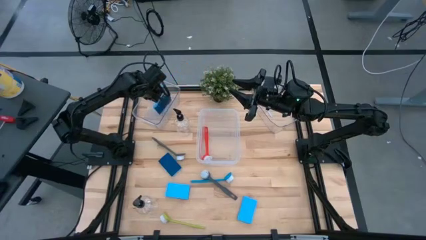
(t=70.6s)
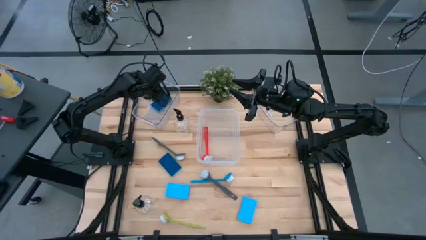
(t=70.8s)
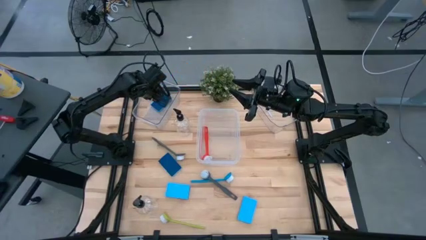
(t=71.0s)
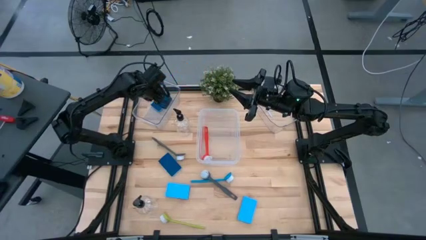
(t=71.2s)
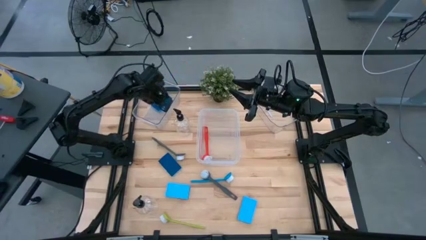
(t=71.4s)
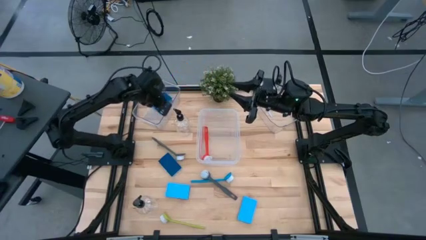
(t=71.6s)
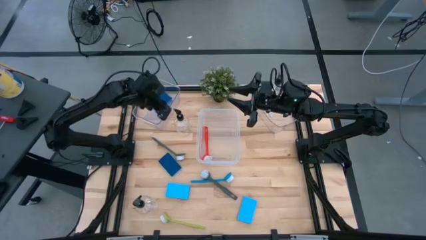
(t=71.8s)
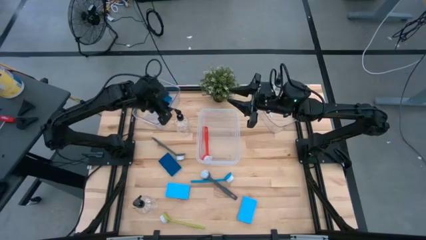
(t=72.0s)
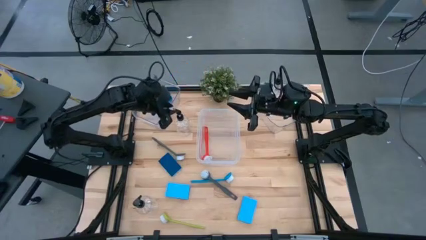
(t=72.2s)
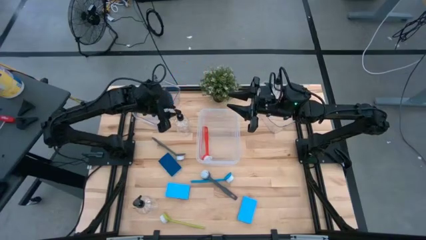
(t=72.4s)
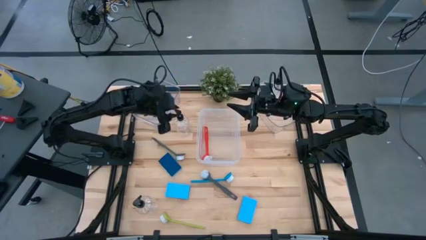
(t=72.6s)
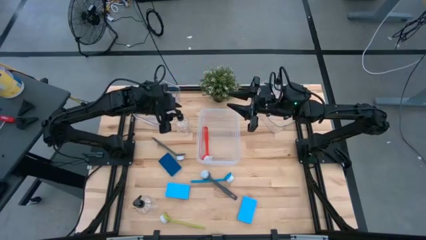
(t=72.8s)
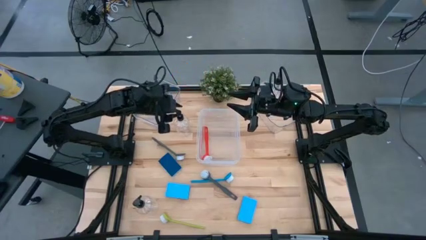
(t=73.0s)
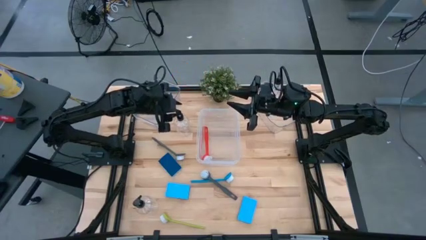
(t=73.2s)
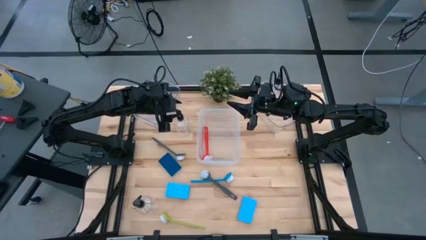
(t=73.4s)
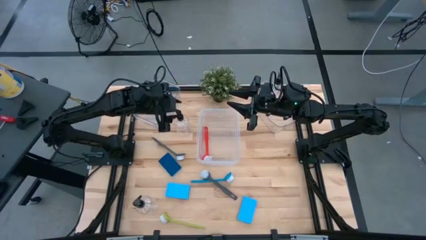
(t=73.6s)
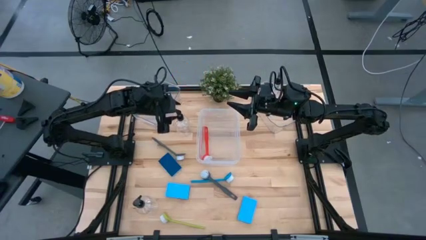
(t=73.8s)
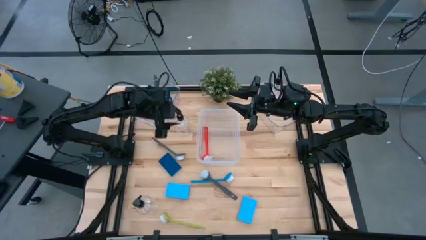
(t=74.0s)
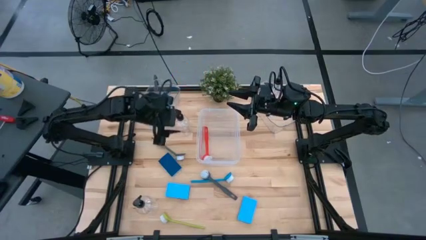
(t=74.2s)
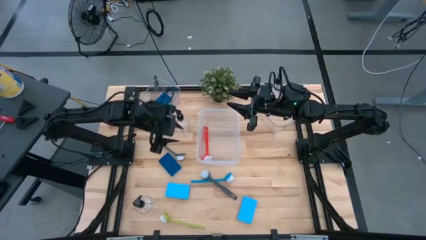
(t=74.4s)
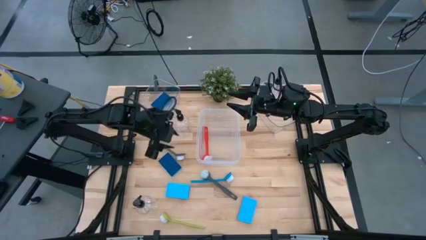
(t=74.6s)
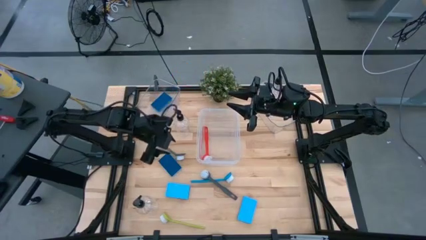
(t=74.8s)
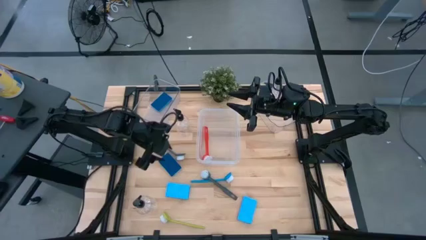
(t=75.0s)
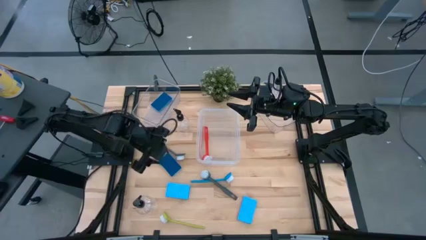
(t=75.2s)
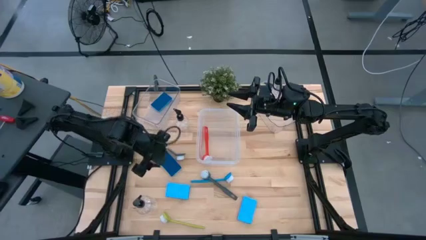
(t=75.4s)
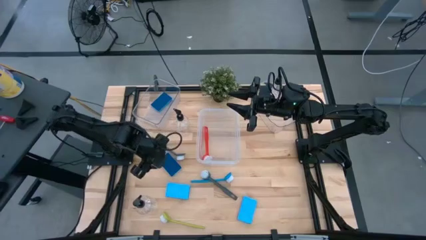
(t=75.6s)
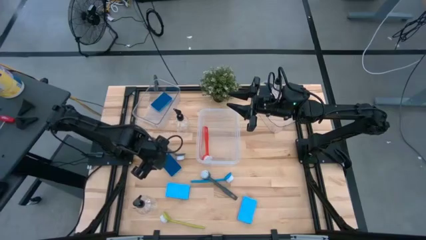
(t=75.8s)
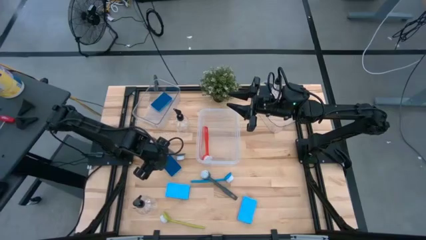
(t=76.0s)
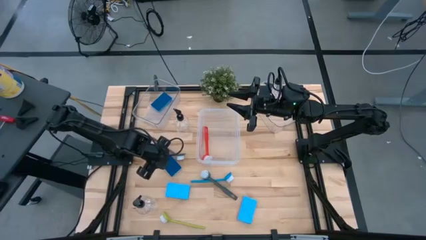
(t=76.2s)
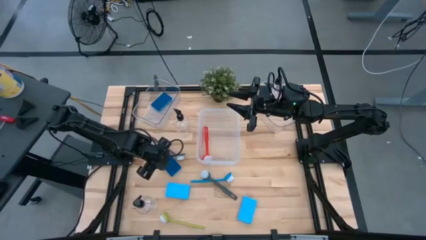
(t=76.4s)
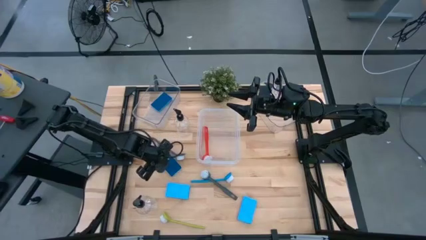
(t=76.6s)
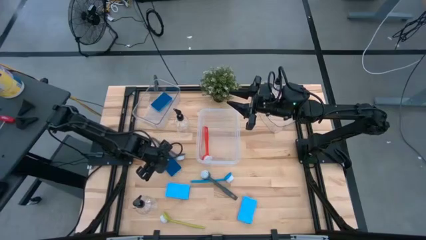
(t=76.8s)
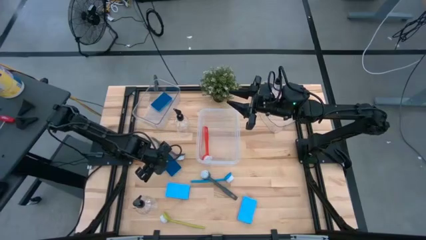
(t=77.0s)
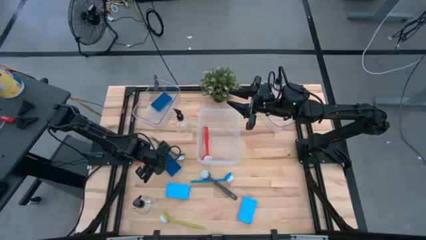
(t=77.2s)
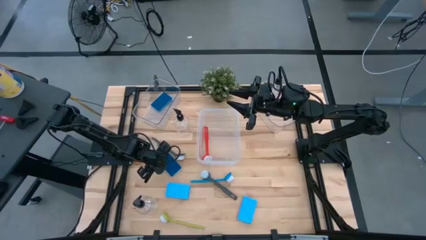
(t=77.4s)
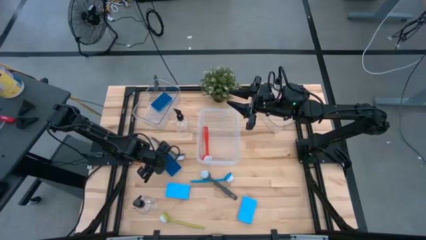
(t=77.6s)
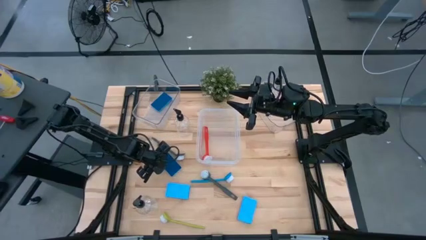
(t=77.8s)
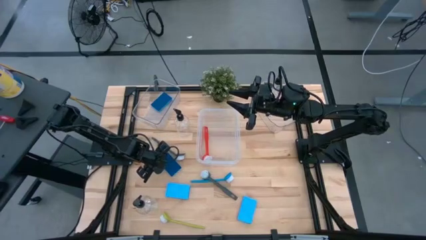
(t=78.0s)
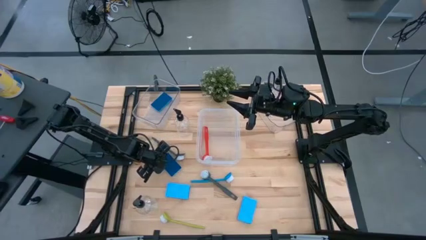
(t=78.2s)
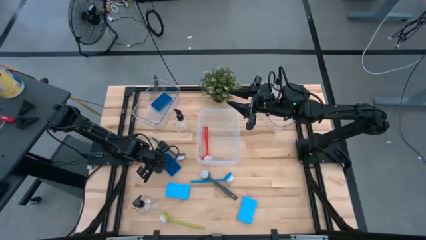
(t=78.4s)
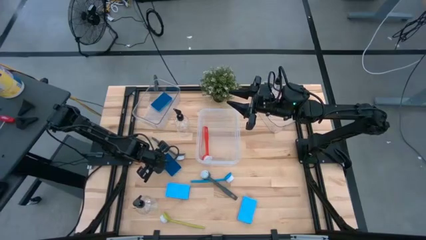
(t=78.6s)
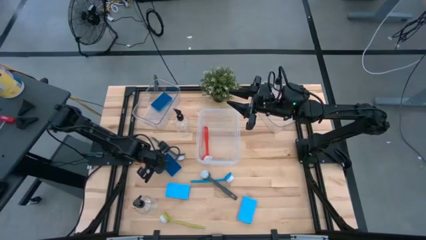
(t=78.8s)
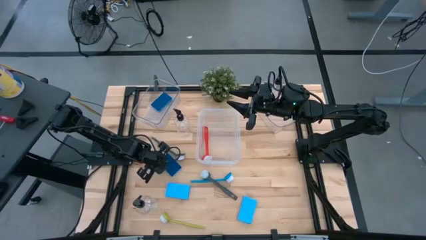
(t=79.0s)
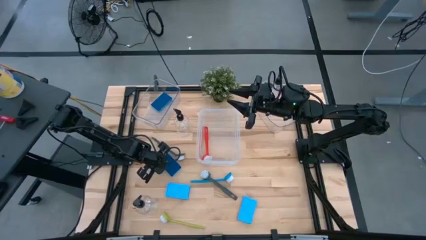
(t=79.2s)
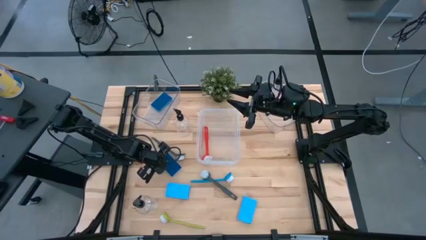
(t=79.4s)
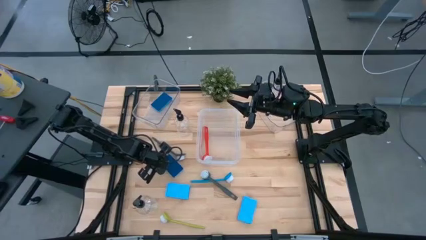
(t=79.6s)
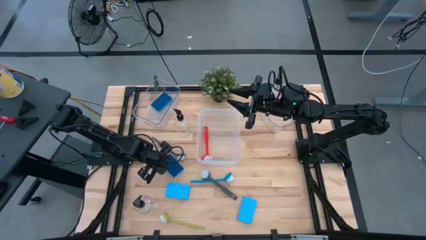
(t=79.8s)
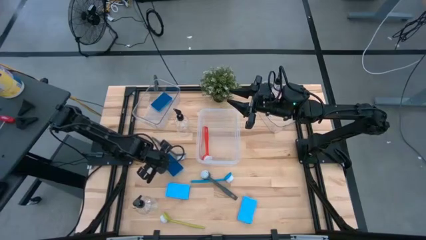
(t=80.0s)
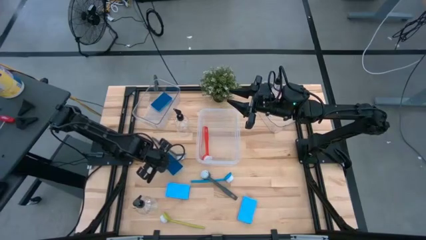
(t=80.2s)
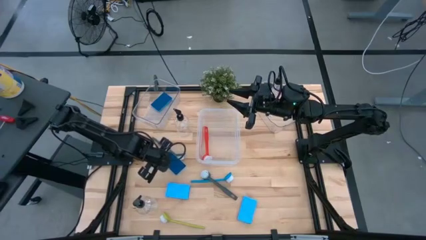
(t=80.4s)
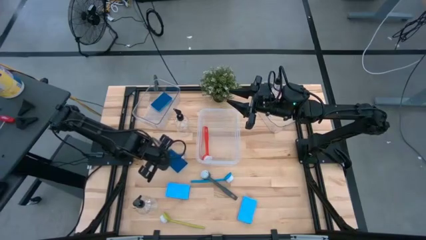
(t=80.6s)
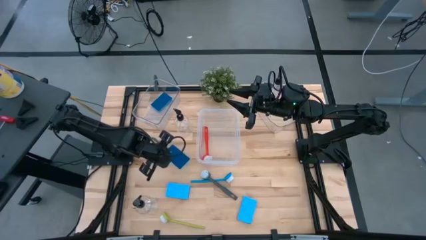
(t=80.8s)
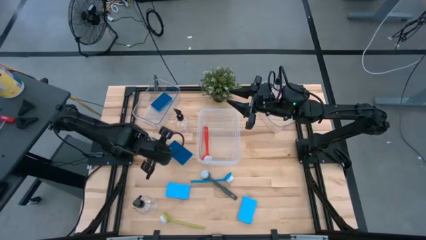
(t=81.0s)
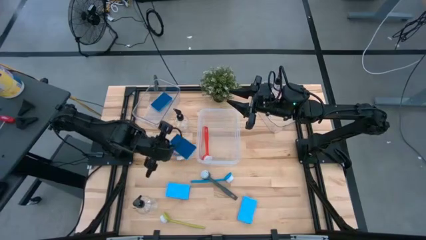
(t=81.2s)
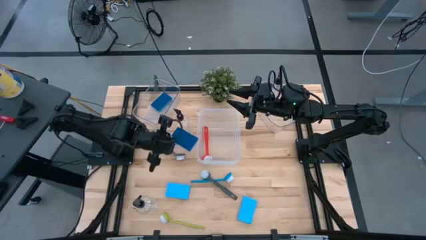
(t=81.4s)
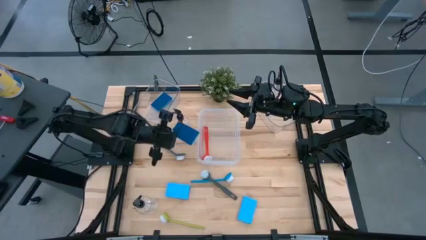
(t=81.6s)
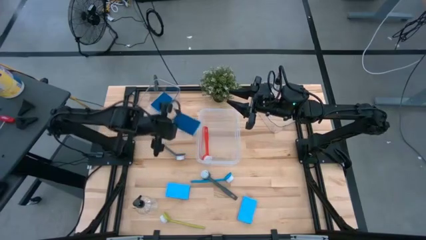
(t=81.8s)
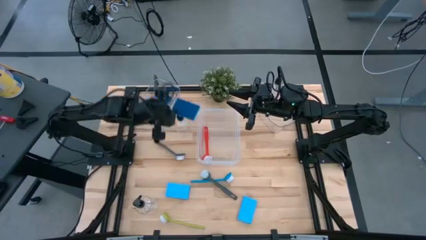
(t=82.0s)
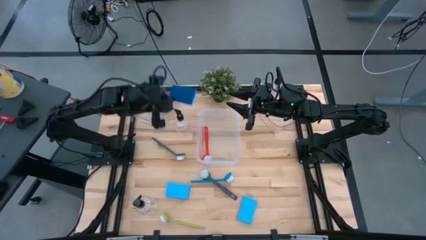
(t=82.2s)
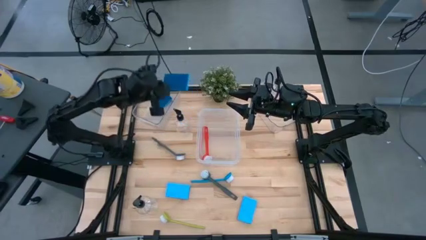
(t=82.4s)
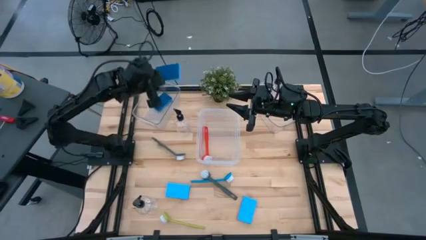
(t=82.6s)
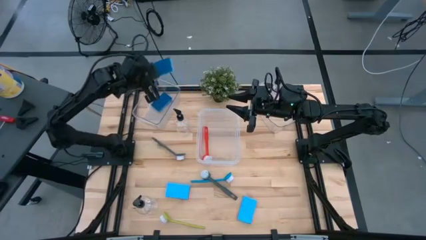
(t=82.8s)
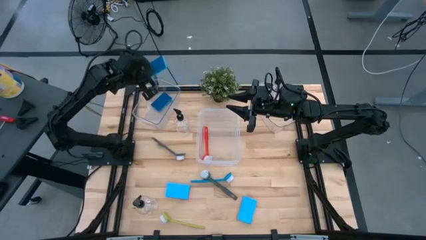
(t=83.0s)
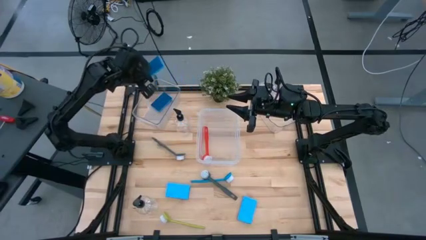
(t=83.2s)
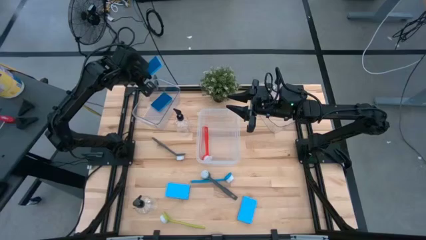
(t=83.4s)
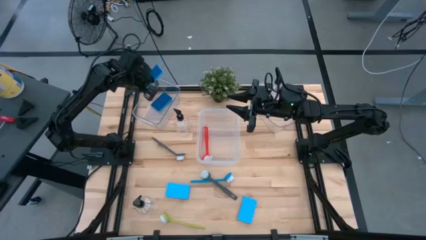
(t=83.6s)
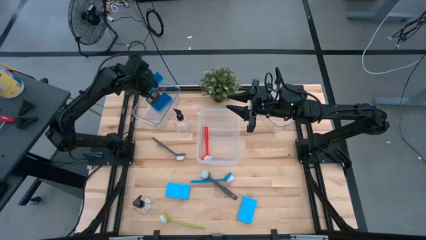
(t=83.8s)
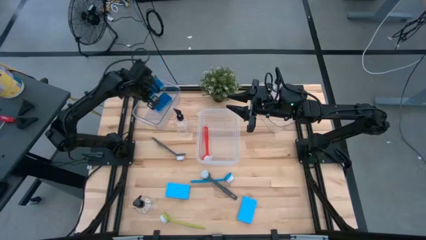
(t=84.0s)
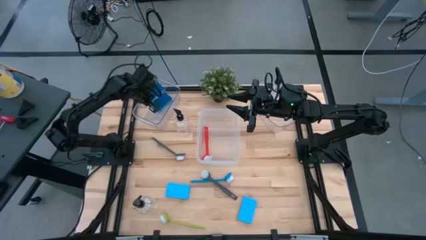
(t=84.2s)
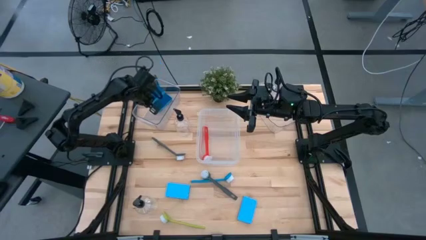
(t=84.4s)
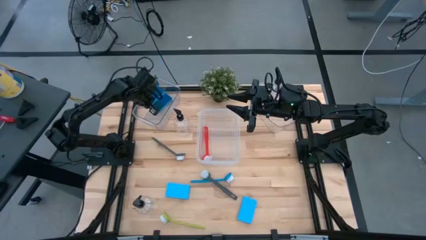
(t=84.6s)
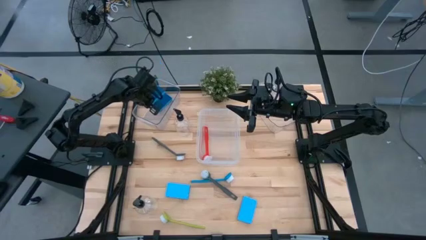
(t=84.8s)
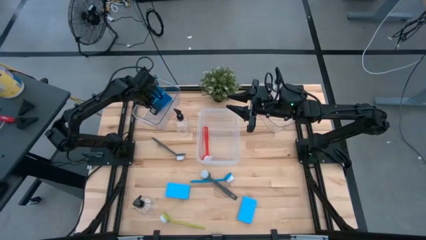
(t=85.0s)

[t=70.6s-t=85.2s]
Task: Pick & Place Kitchen Sink Supplies
Put the blue sponge in the left transparent bin
